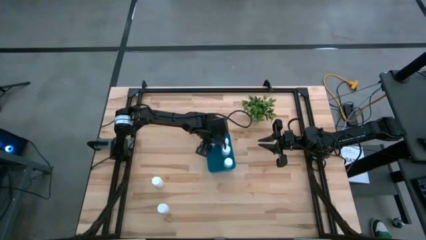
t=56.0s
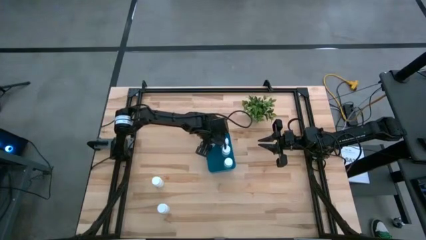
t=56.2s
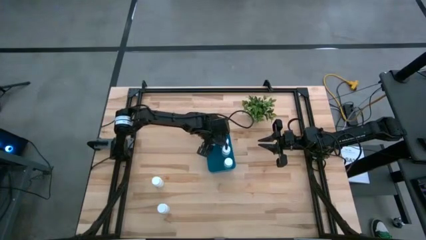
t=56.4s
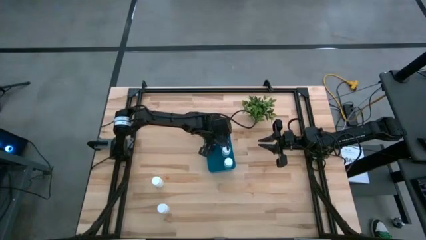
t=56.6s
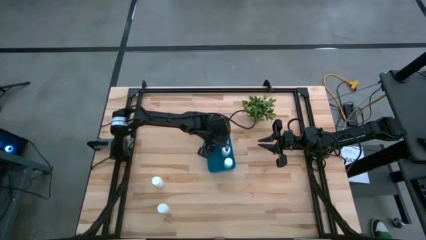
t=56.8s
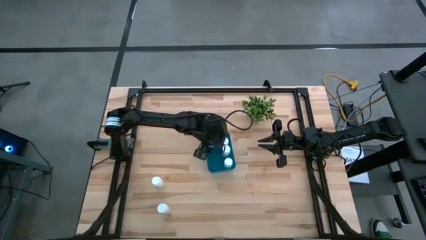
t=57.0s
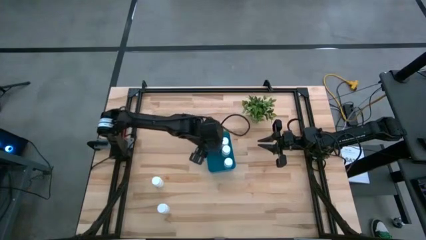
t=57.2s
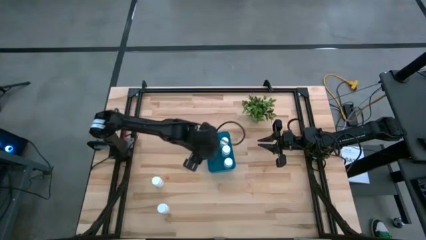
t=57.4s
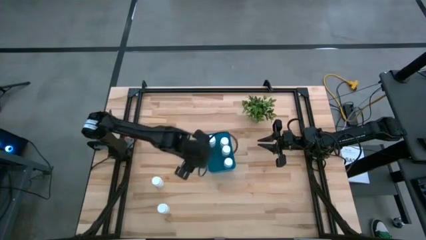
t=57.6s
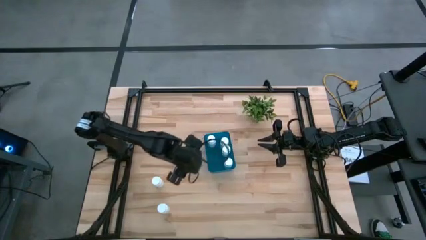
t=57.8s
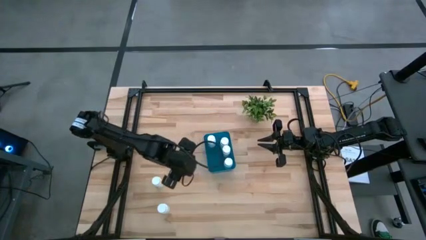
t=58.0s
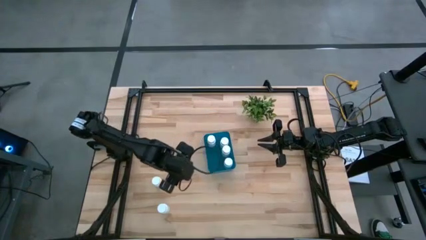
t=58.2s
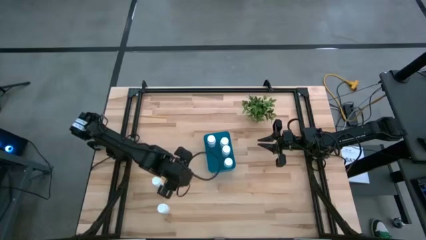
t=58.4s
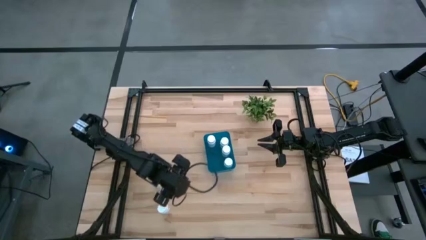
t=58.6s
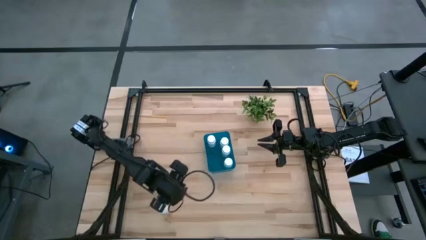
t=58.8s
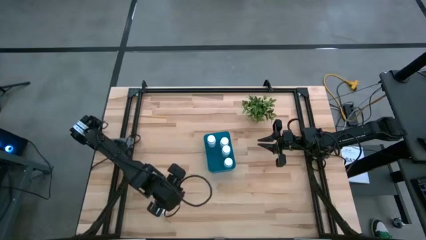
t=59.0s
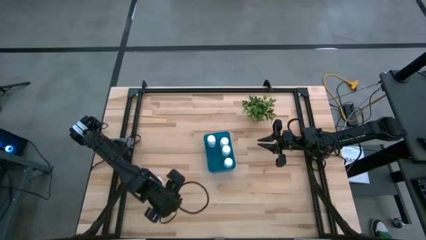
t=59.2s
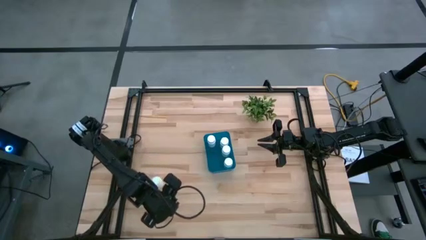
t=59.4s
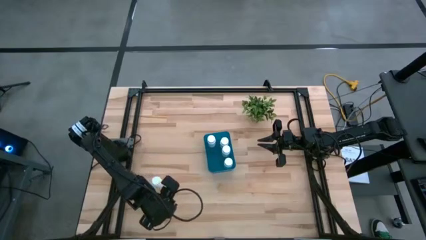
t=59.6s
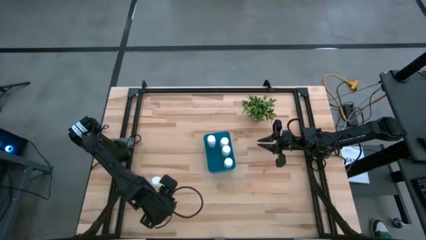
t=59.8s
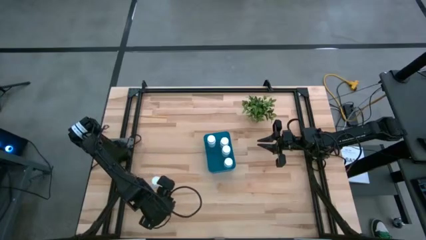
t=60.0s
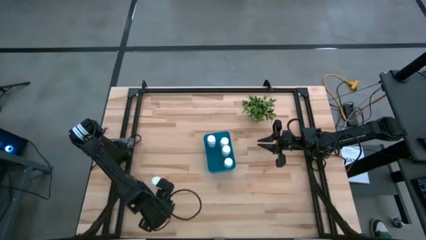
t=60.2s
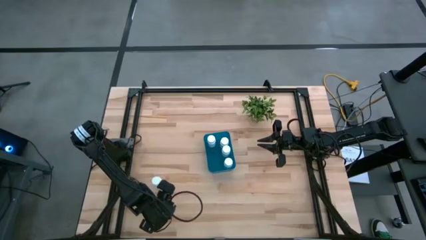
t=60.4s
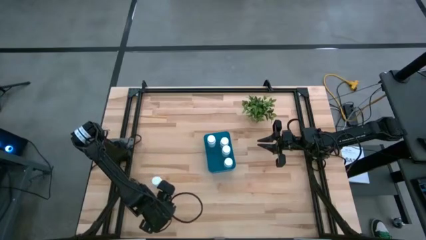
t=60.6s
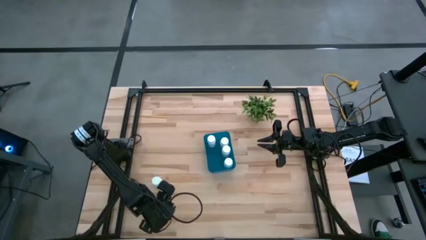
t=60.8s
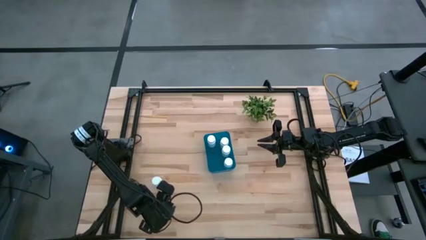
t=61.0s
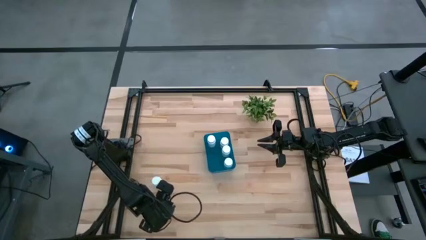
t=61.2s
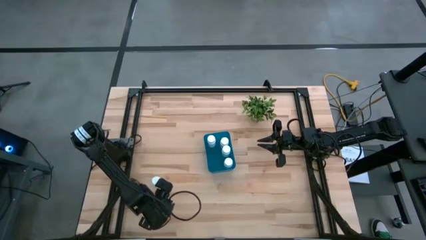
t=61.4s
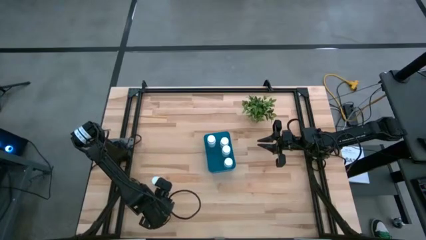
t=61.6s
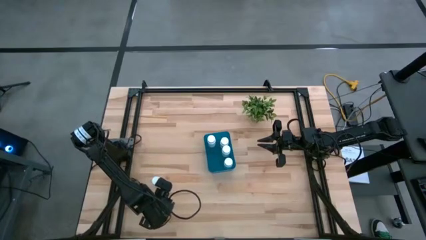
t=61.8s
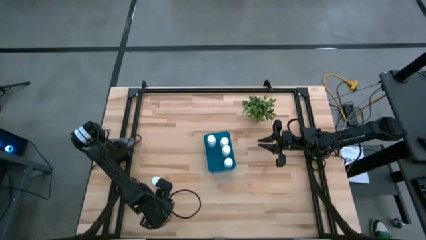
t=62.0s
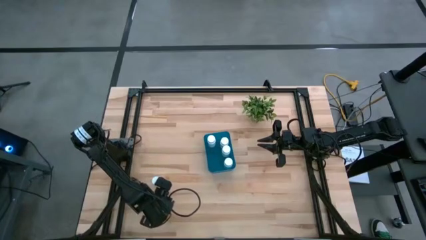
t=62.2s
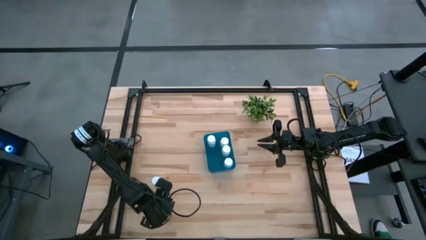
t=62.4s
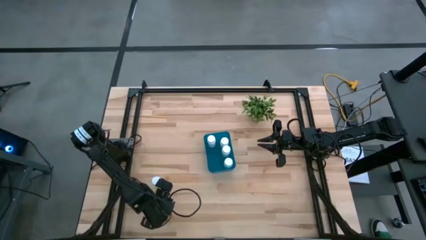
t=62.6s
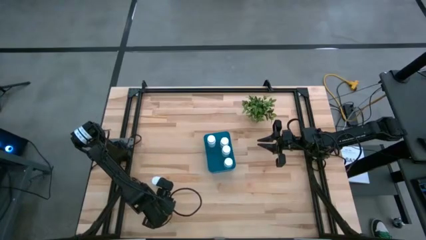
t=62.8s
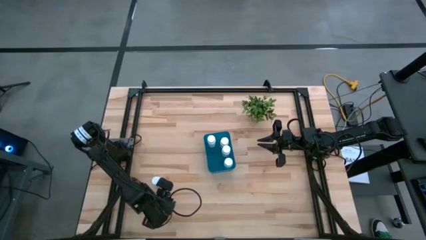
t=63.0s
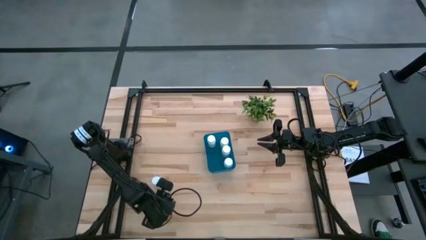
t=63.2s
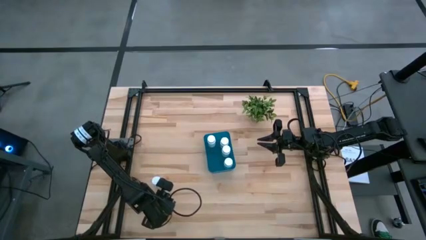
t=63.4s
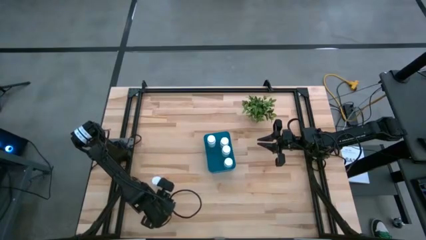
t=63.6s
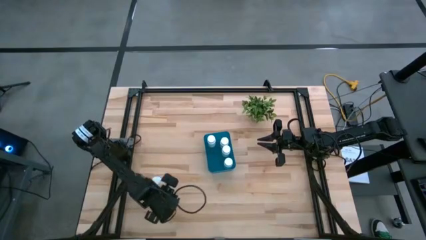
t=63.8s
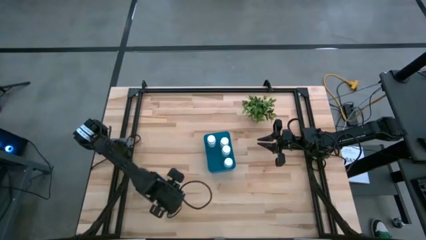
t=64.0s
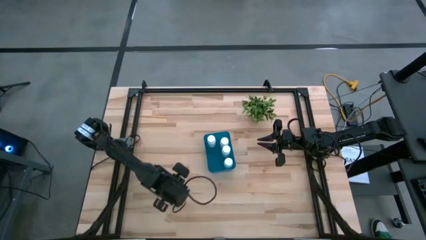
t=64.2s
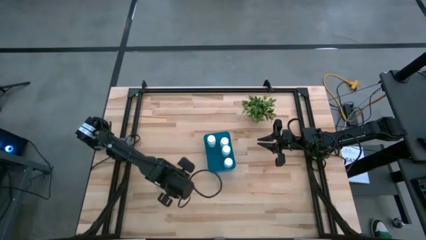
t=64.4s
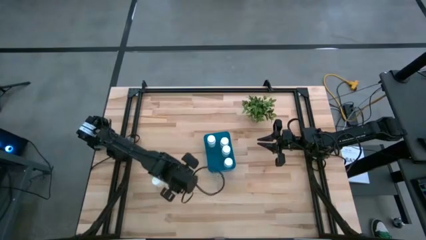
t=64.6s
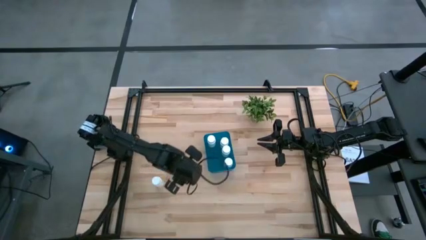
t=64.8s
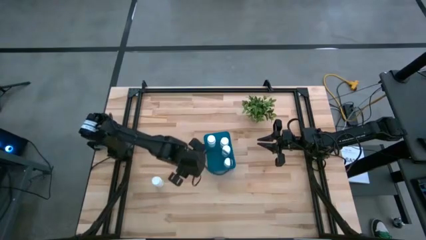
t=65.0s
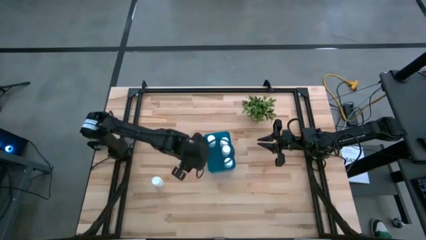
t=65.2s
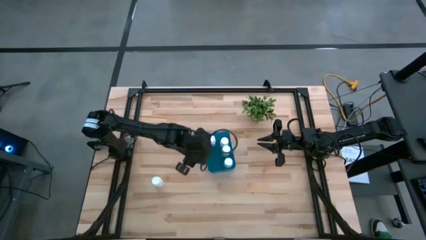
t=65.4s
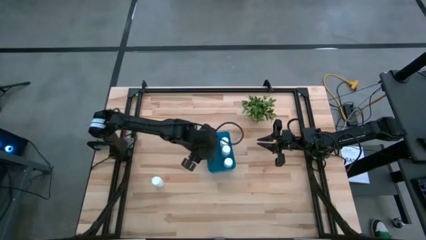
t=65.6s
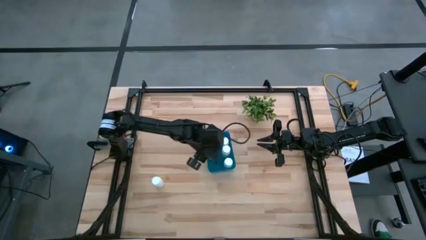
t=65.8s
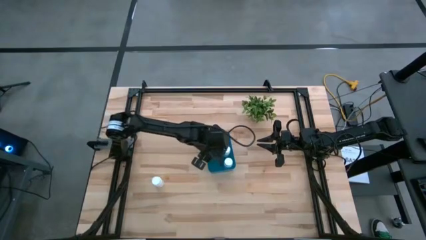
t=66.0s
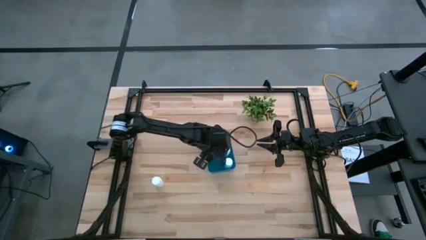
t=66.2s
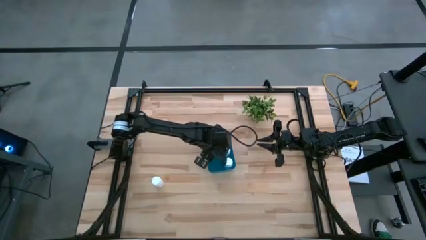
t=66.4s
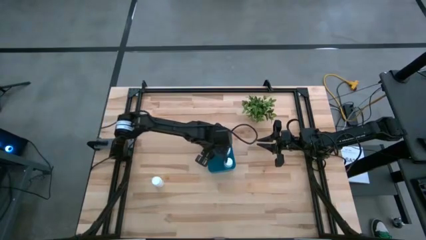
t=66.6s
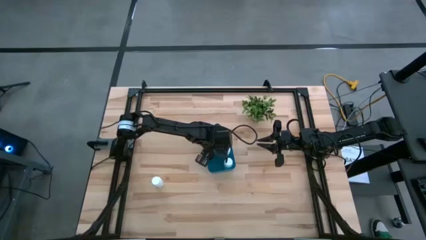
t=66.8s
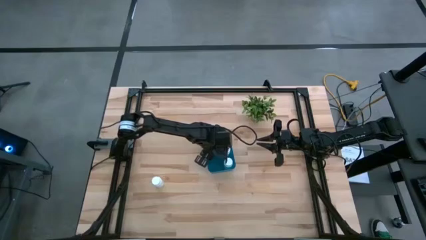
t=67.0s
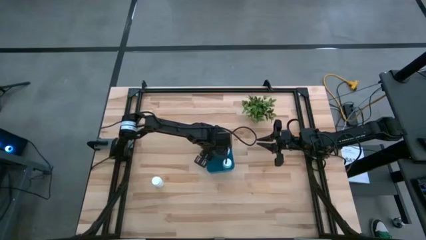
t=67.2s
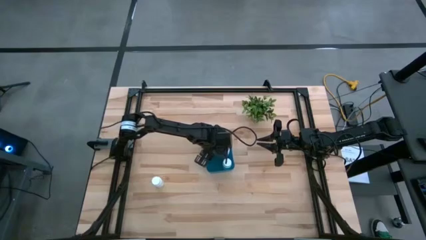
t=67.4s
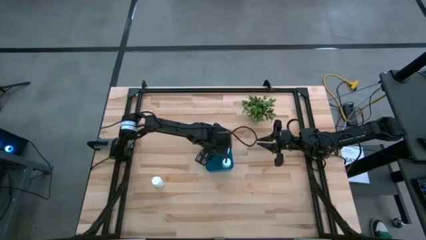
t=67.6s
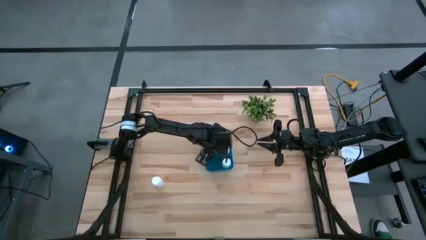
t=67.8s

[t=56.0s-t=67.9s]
Task: Pick and place pill bottles into a basket
Put the white pill bottle into the blue bin

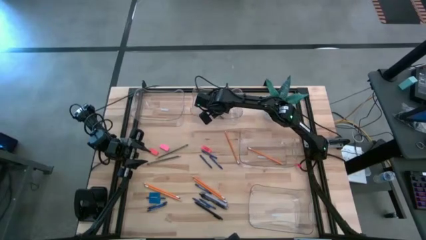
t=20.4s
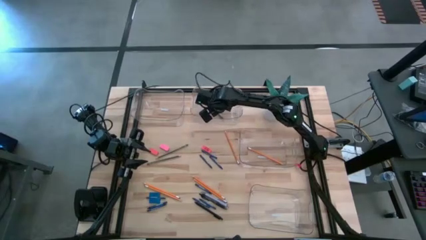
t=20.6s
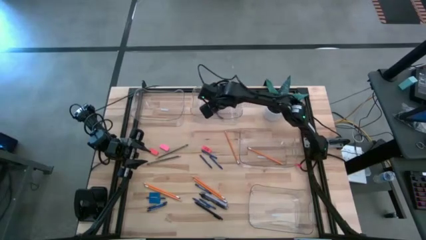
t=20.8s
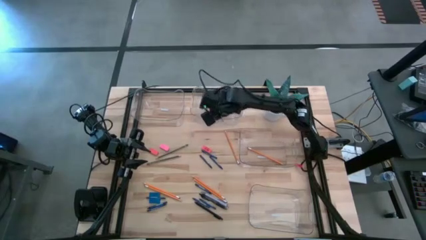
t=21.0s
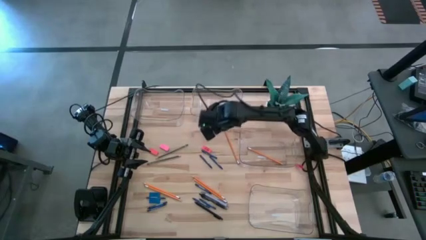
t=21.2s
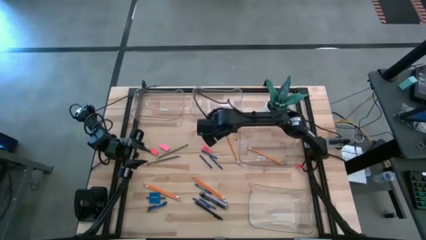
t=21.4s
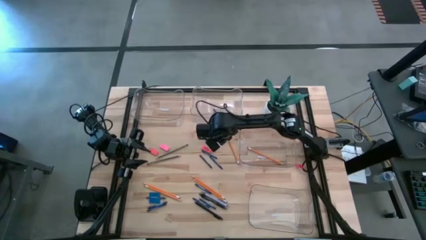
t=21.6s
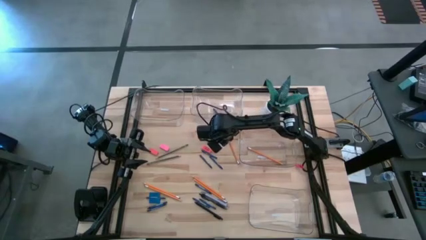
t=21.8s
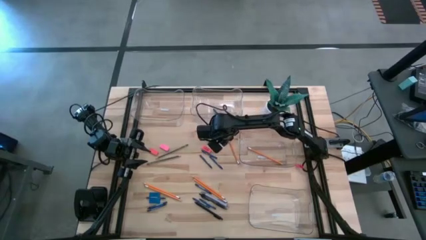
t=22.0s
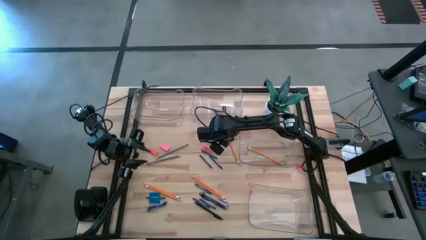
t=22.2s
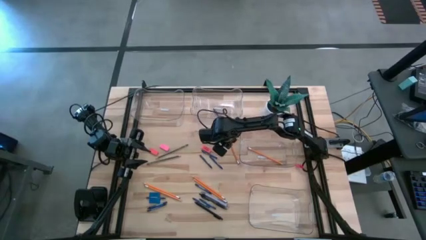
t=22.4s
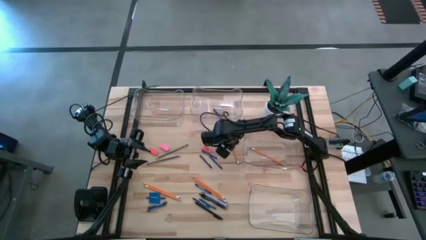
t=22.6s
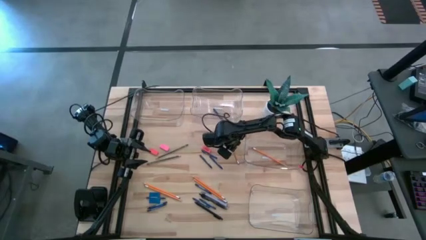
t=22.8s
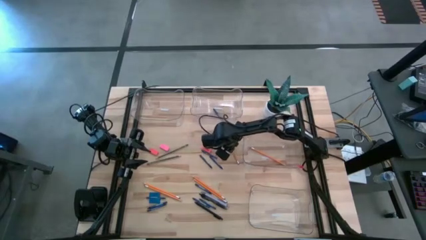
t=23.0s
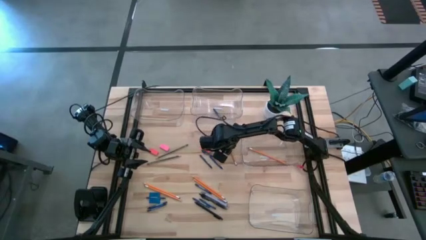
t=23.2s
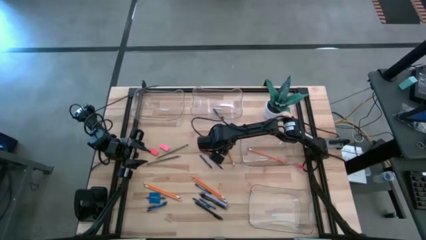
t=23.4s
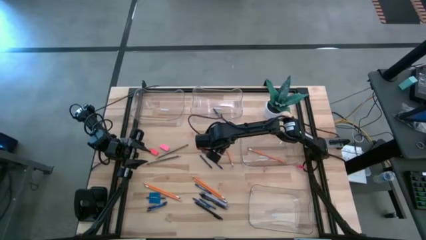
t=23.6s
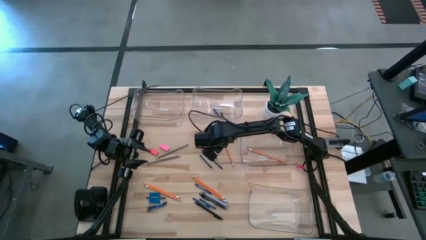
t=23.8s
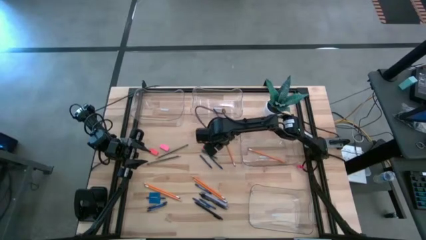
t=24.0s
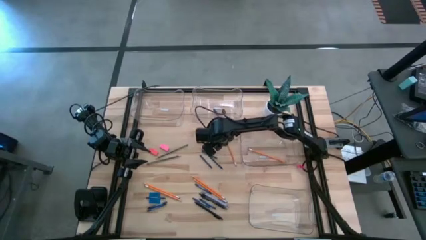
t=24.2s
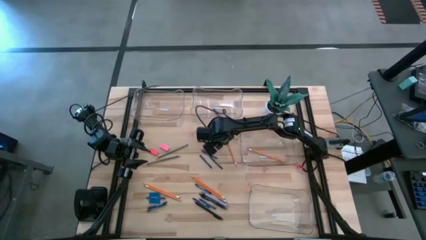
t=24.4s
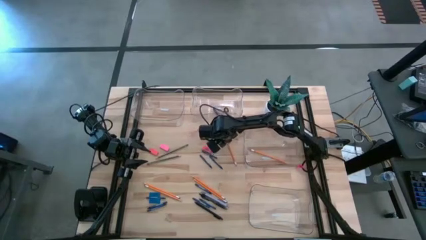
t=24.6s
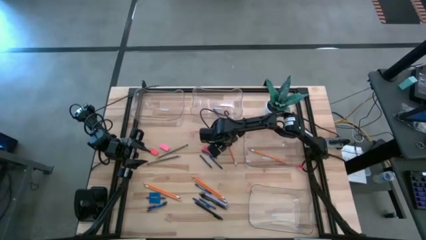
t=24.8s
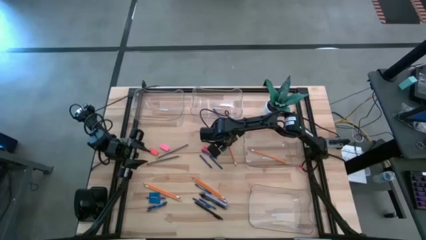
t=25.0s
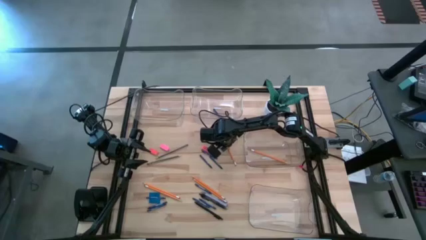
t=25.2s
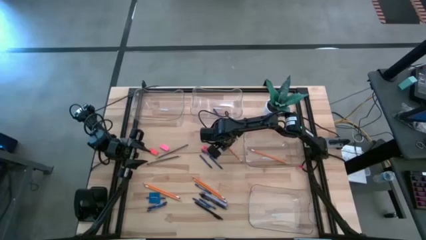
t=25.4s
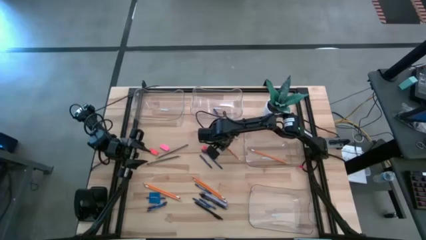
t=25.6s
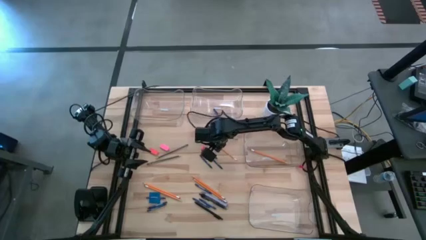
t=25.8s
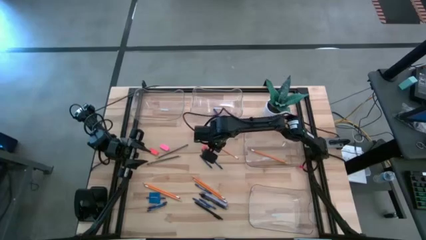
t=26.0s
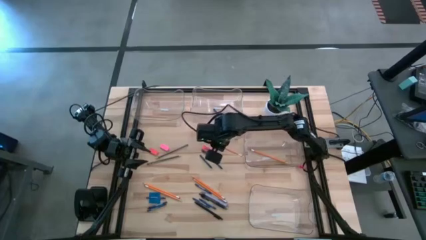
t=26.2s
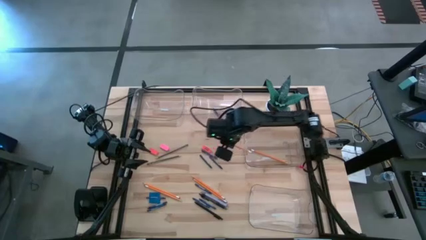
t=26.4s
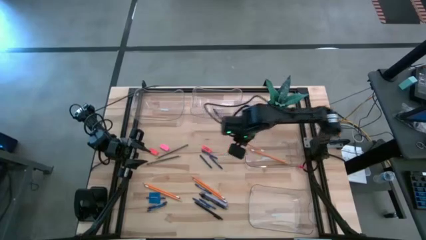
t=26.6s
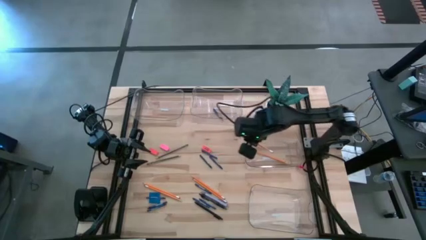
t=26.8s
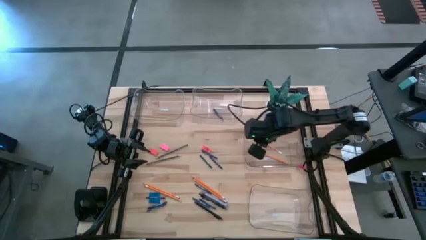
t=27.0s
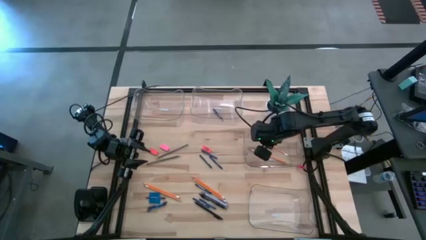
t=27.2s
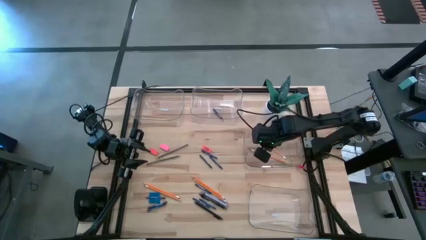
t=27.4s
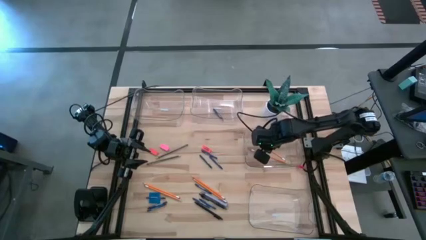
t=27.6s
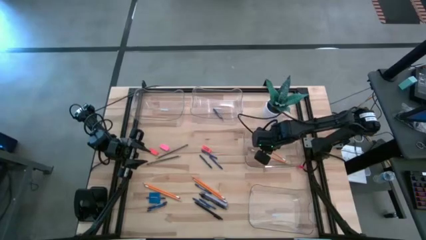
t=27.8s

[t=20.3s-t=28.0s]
Task: Sort crayons/erasers/pens/pencils in bins
Put the orange pencil into the middle transparent bin
